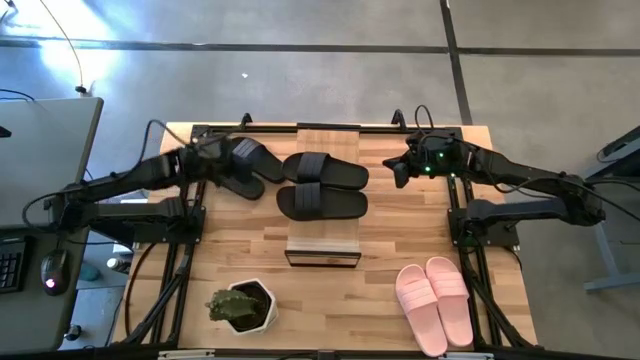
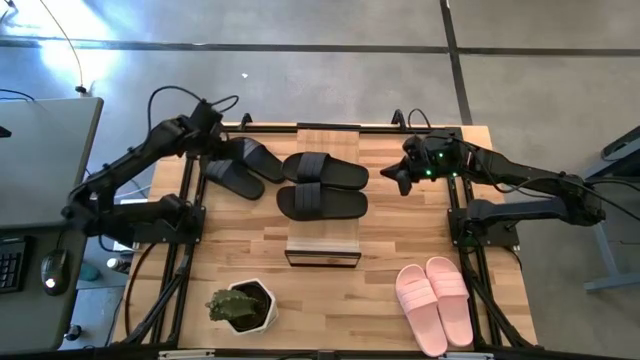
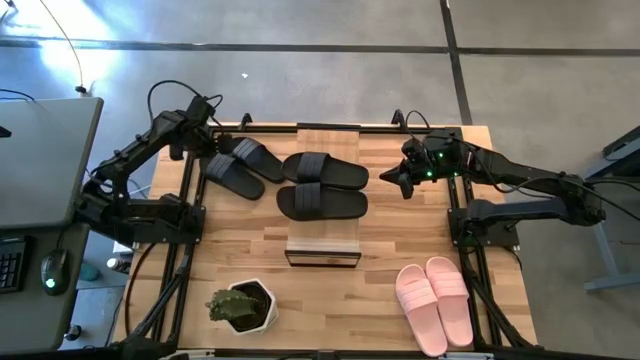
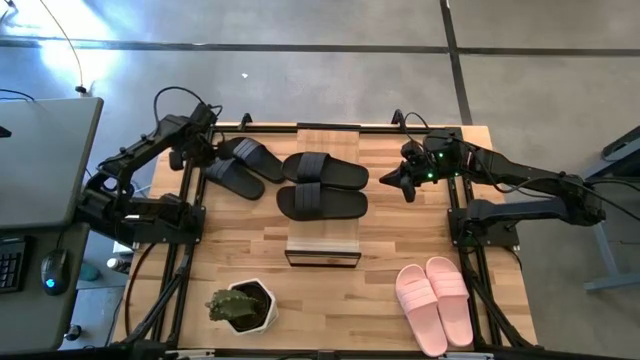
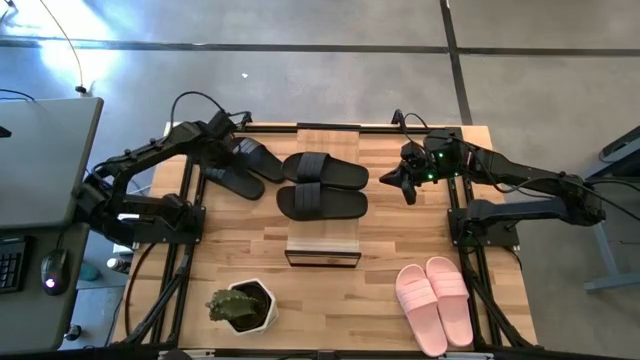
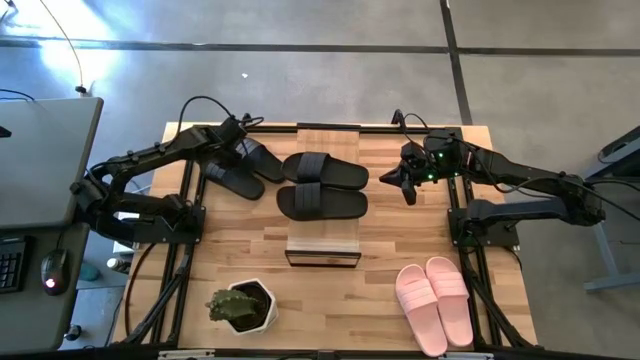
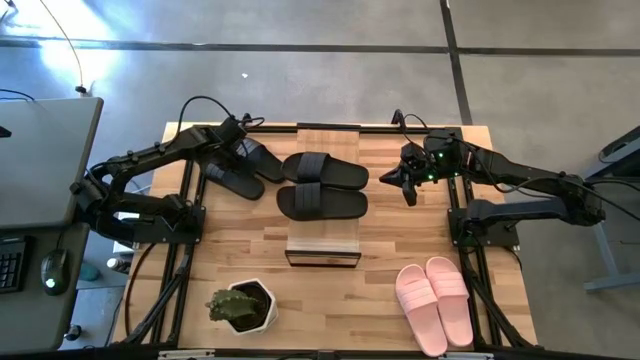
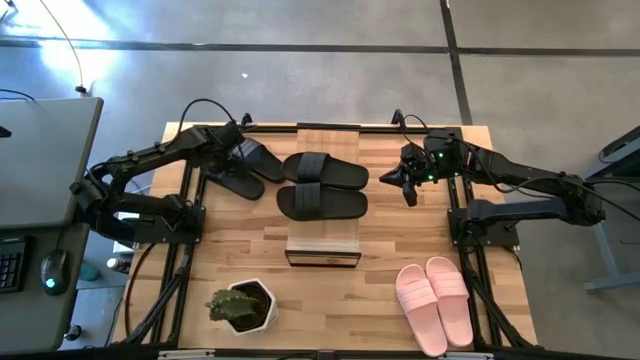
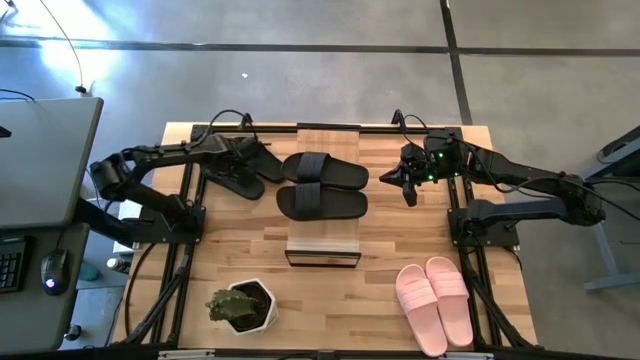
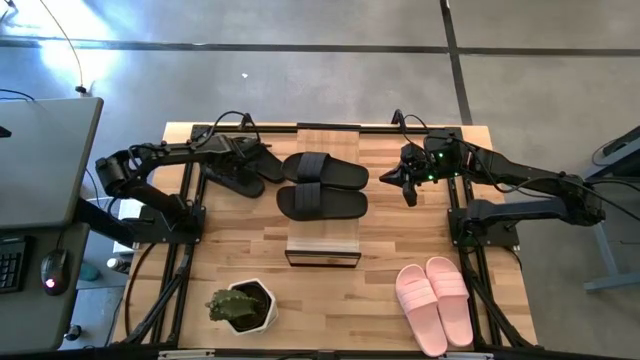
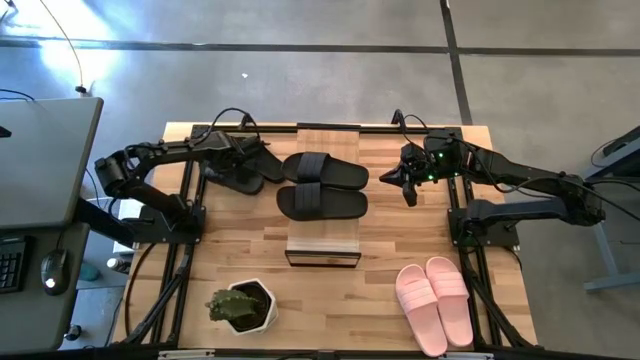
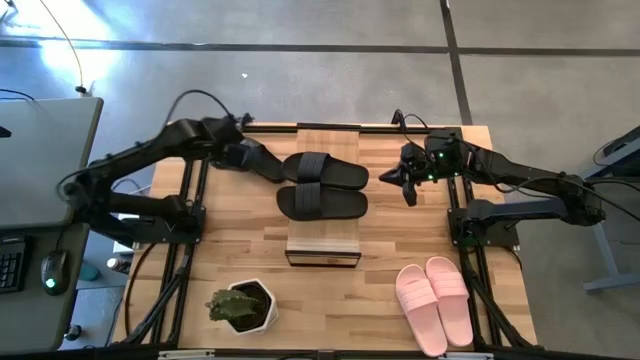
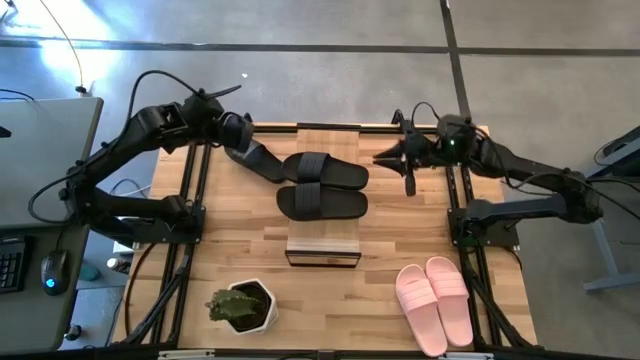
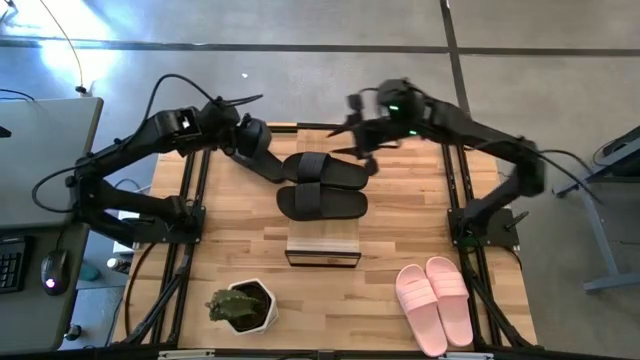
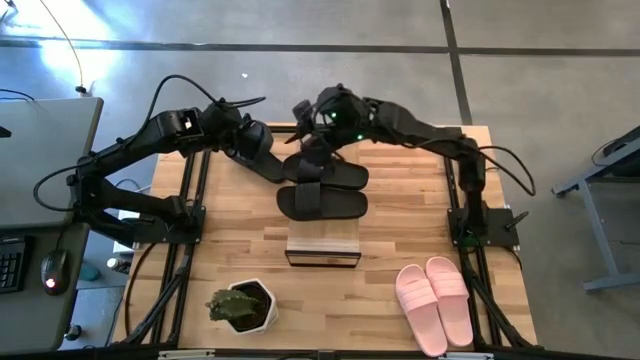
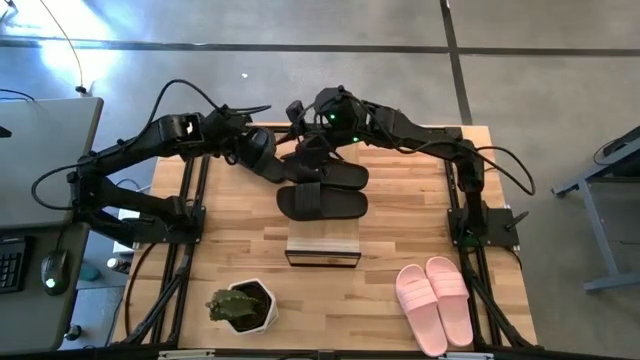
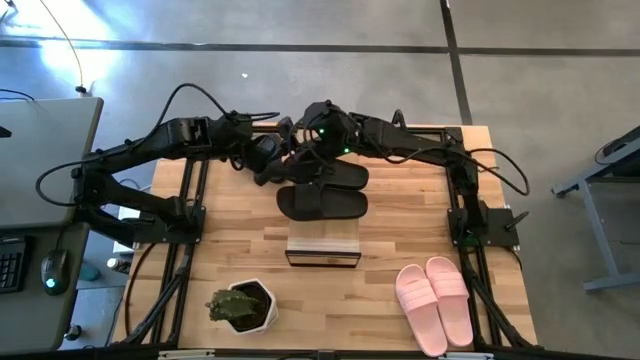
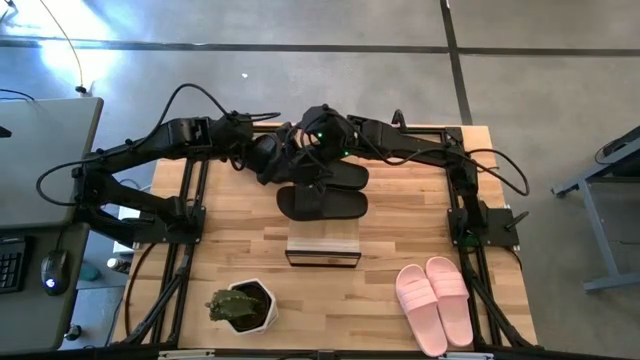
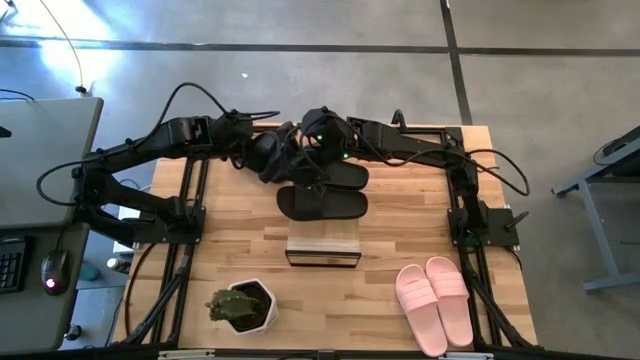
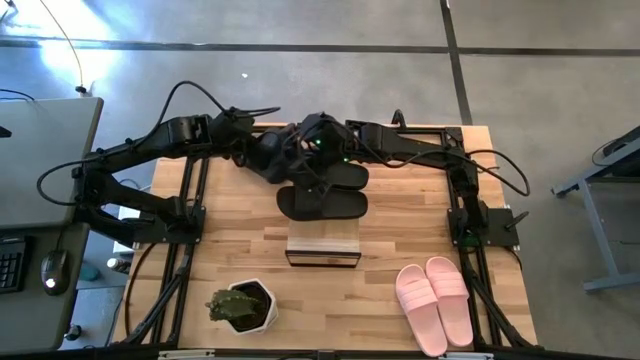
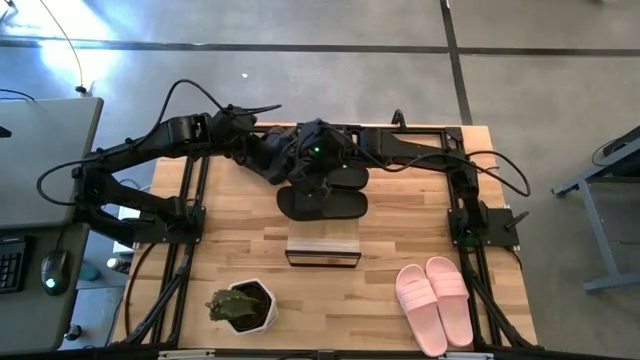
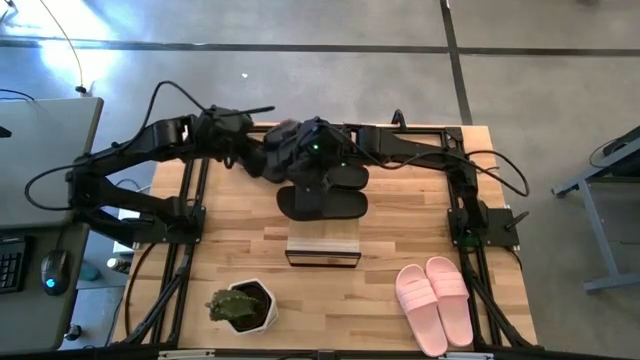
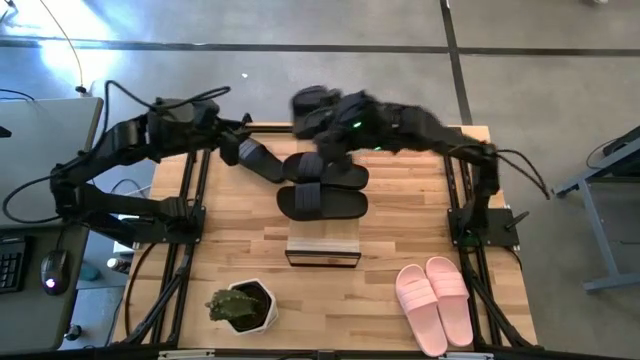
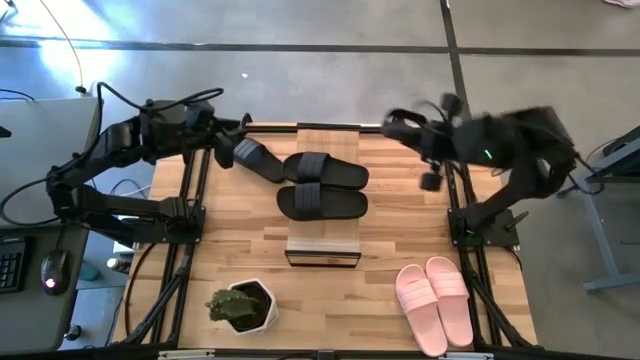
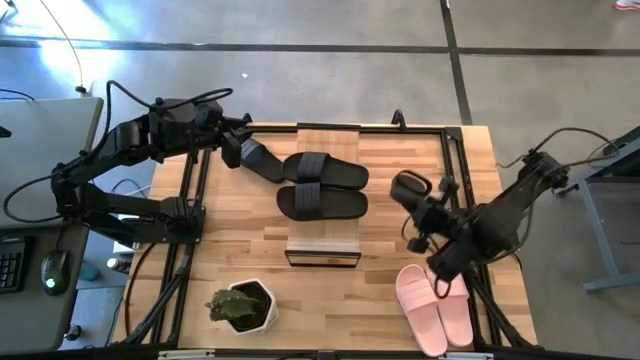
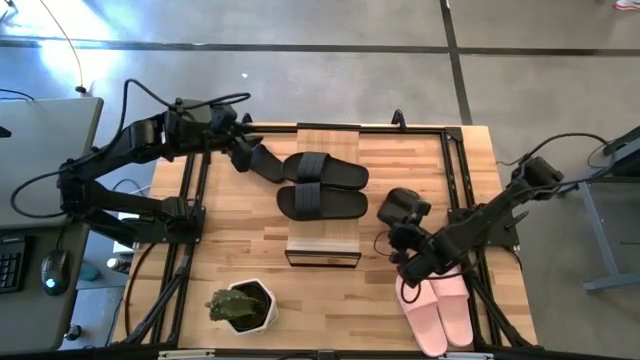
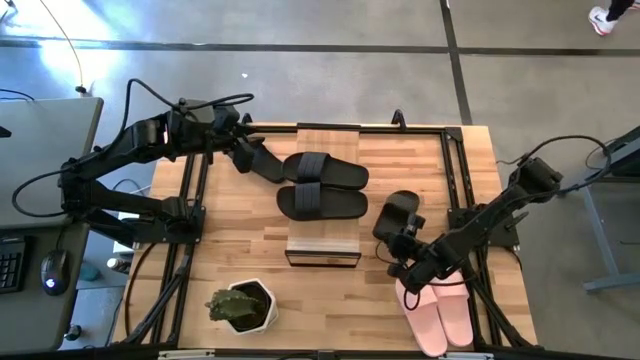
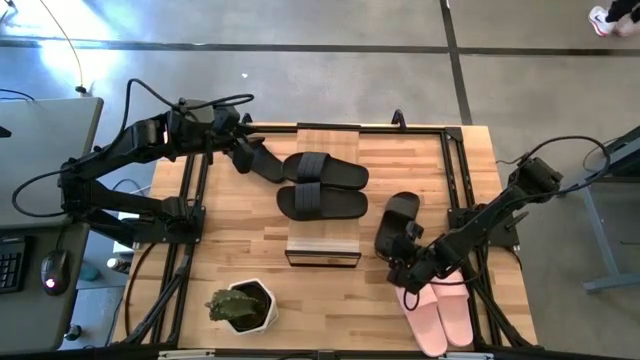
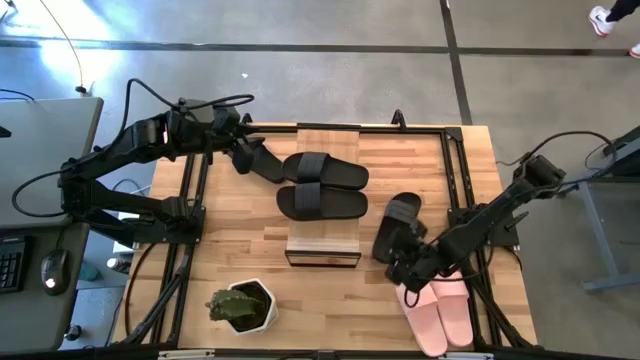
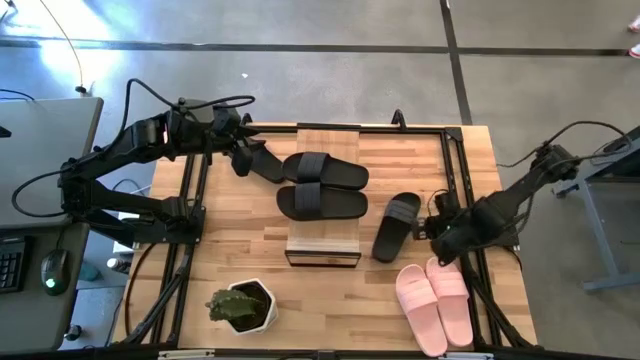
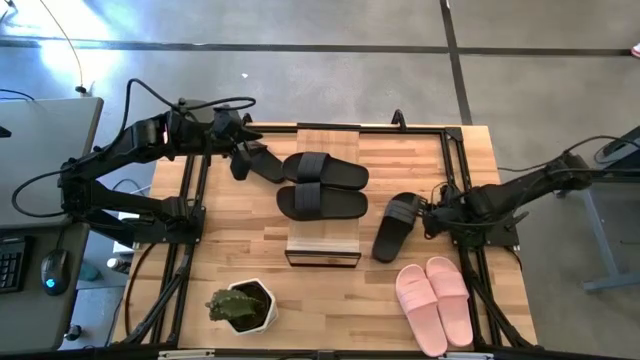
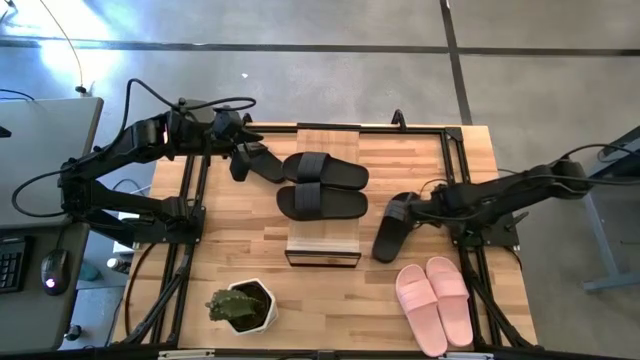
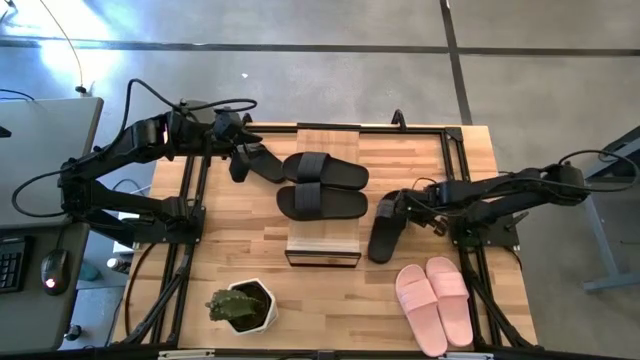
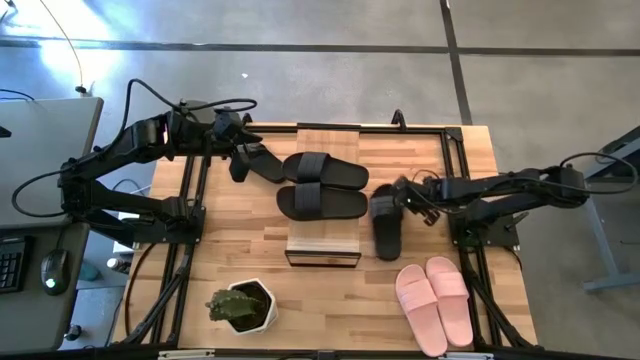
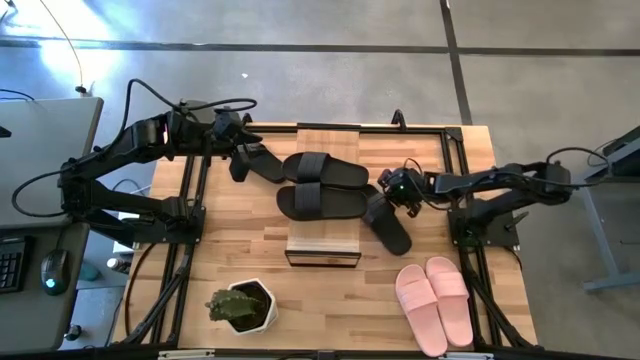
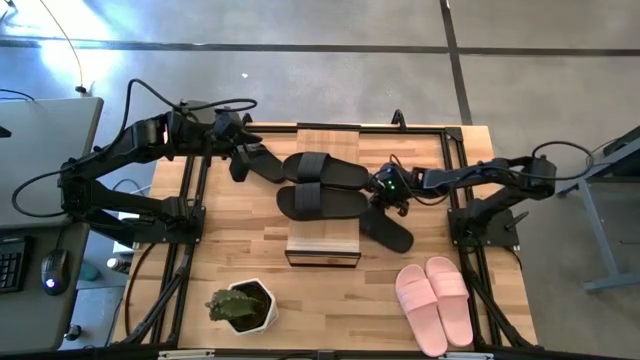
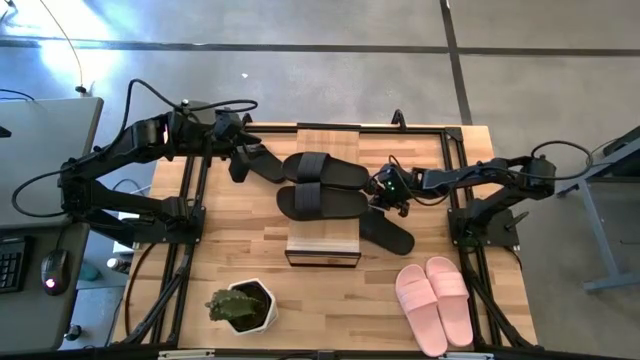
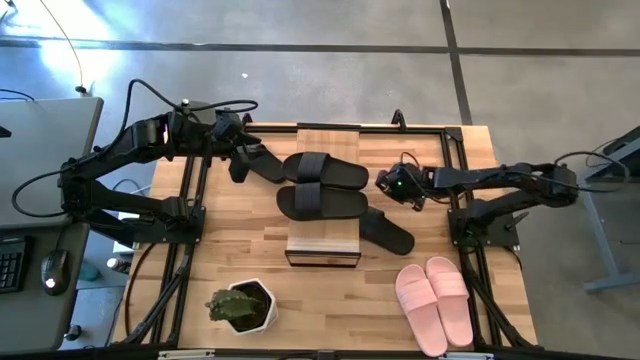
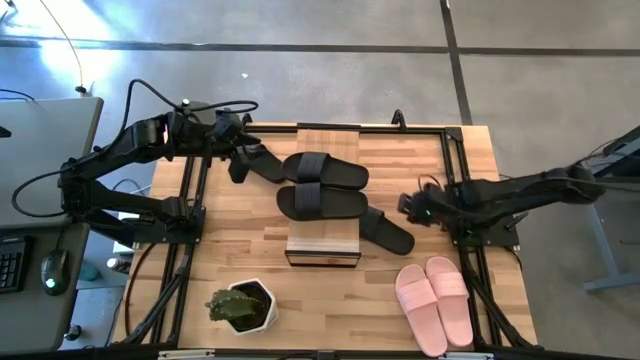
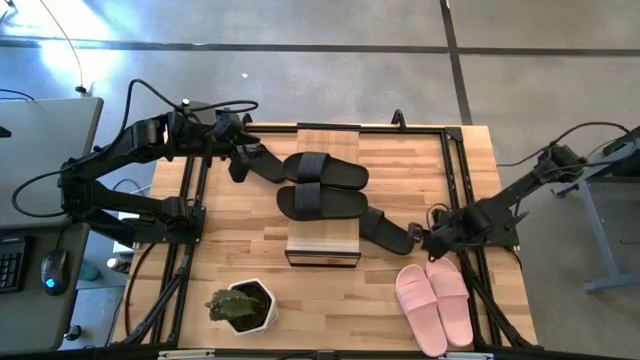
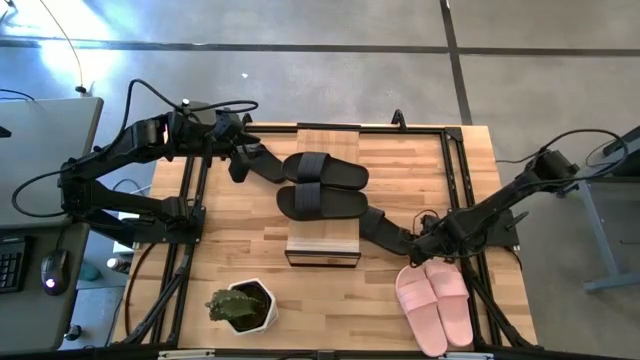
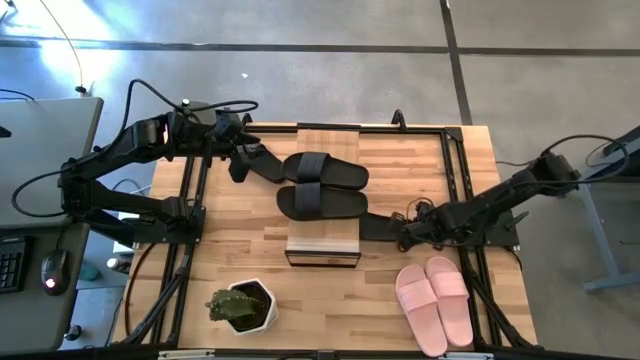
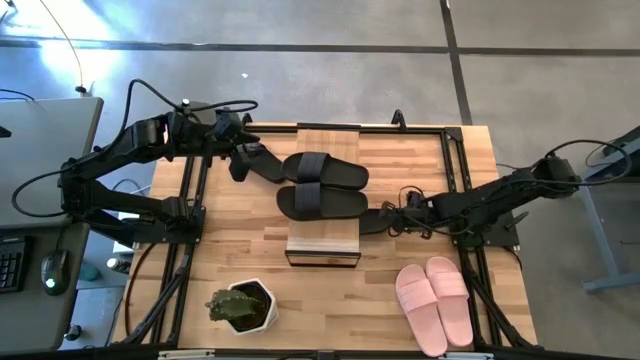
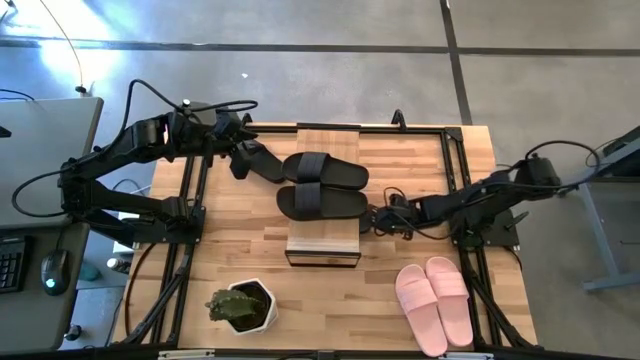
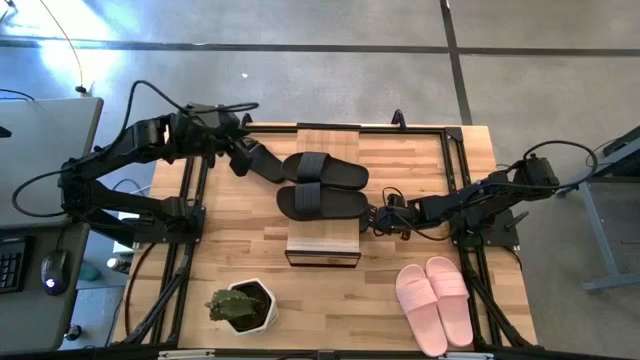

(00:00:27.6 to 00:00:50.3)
Task: Pick and place slides into the shelf
Put the black slipper under the shelf
